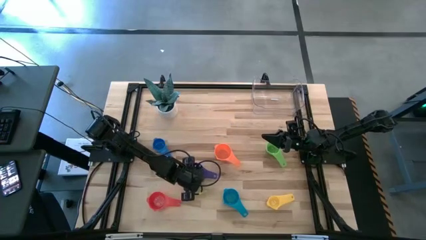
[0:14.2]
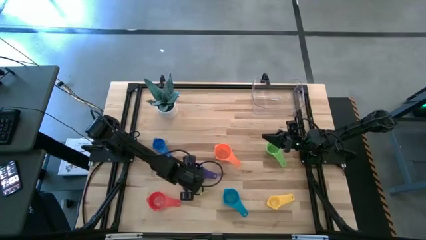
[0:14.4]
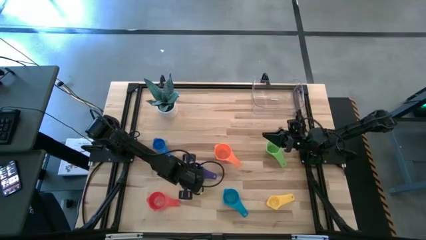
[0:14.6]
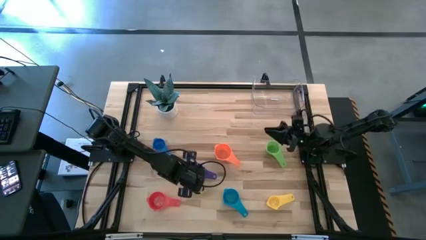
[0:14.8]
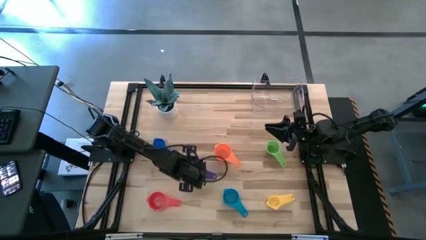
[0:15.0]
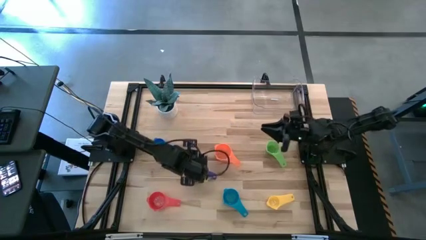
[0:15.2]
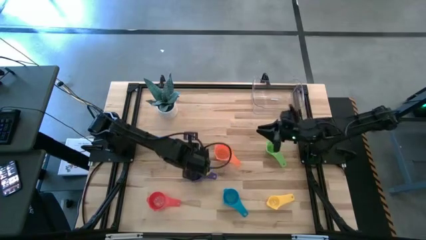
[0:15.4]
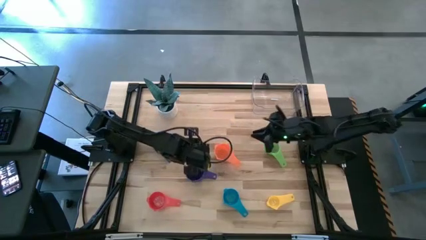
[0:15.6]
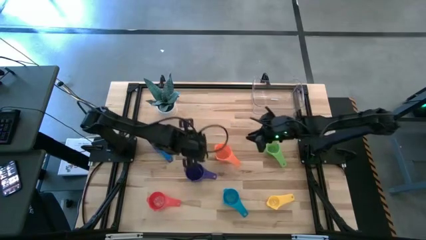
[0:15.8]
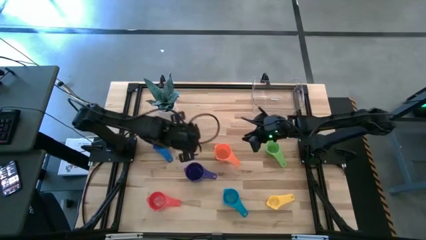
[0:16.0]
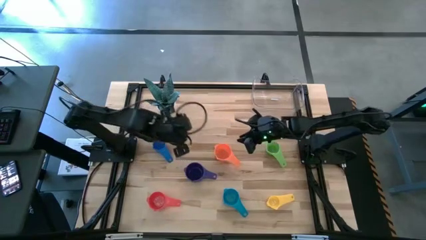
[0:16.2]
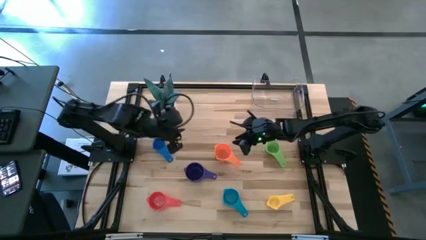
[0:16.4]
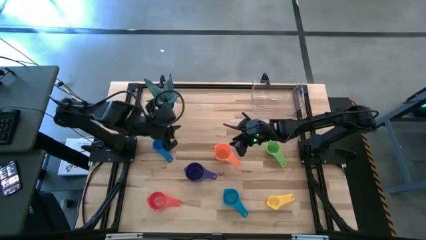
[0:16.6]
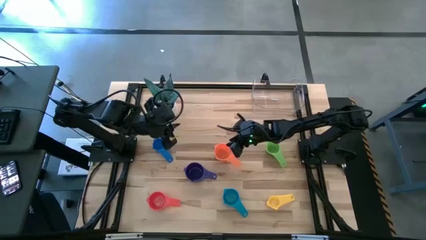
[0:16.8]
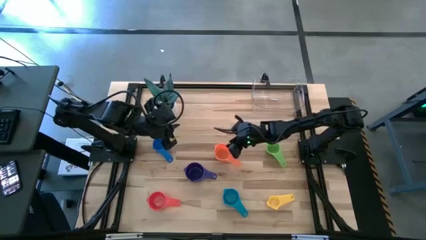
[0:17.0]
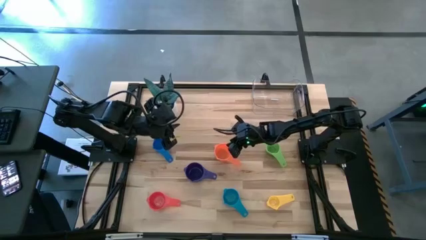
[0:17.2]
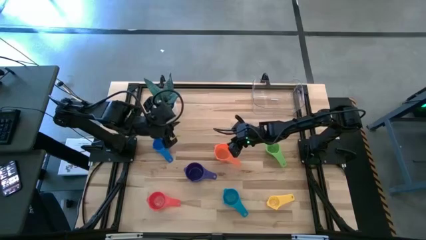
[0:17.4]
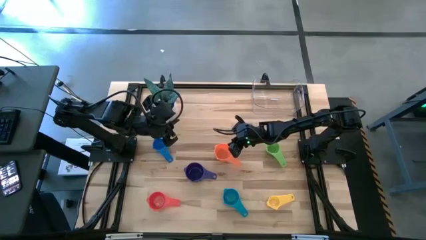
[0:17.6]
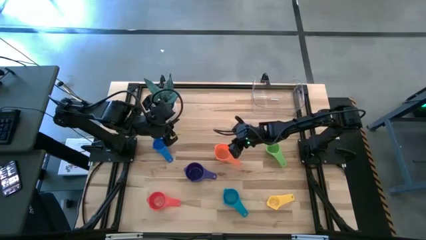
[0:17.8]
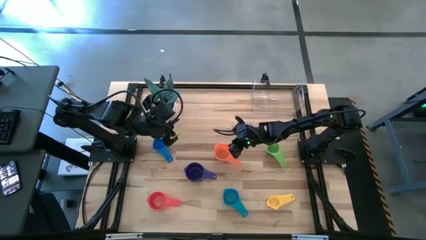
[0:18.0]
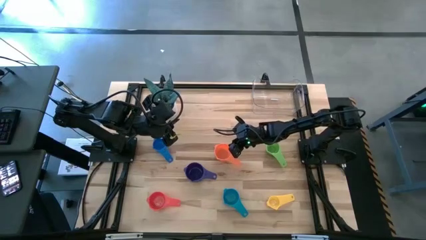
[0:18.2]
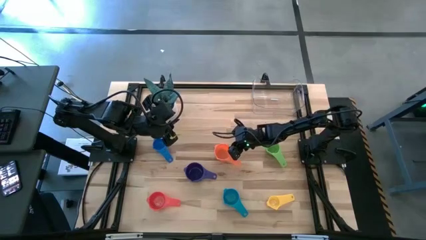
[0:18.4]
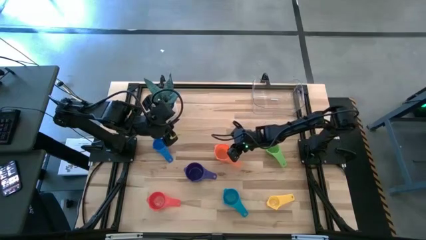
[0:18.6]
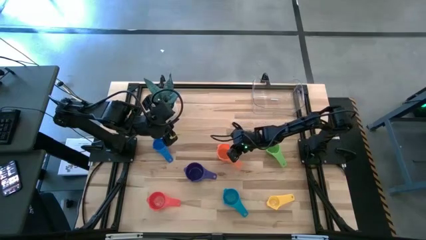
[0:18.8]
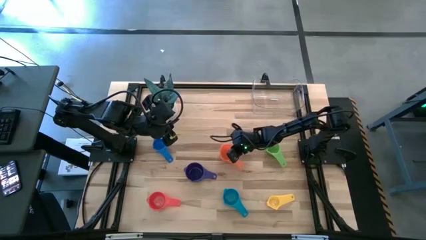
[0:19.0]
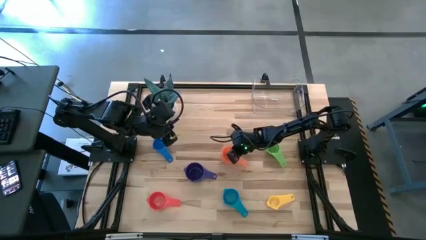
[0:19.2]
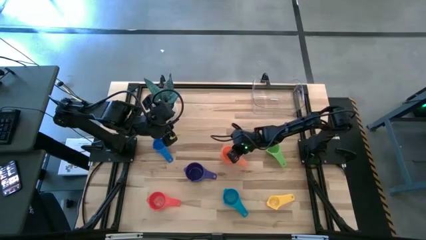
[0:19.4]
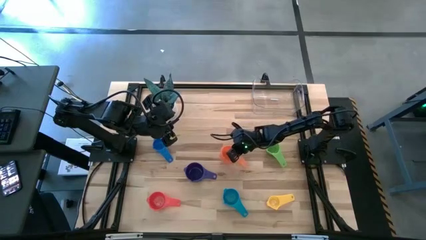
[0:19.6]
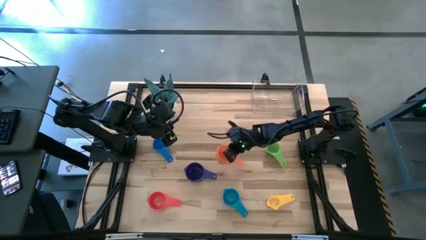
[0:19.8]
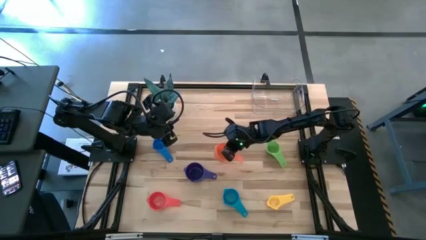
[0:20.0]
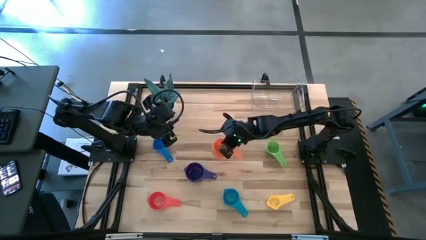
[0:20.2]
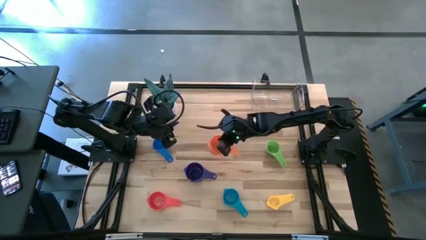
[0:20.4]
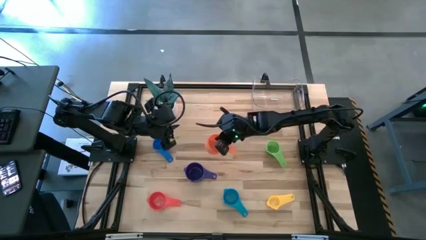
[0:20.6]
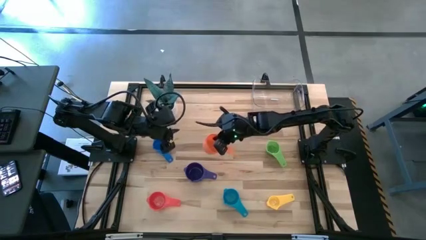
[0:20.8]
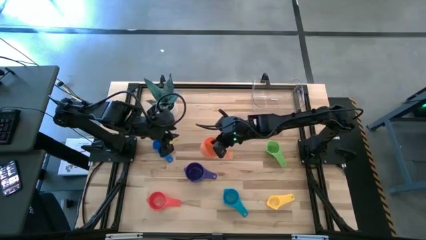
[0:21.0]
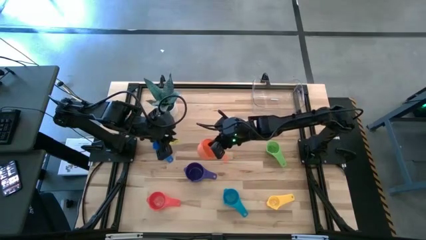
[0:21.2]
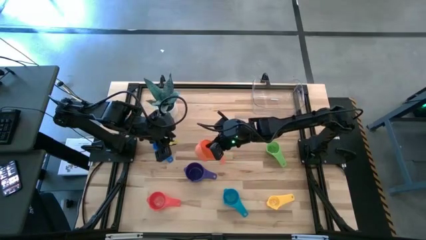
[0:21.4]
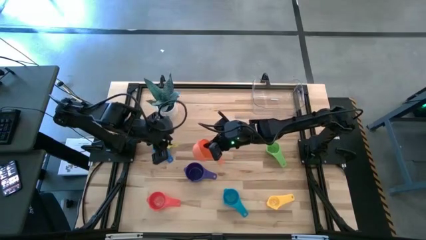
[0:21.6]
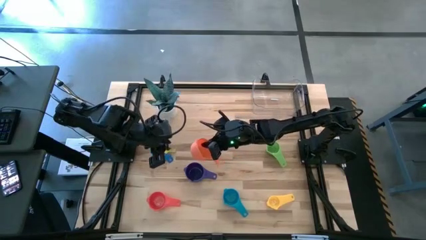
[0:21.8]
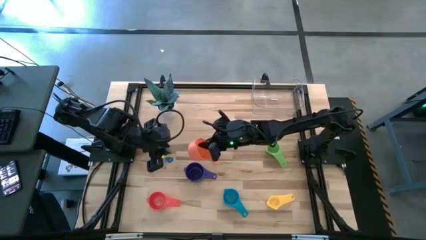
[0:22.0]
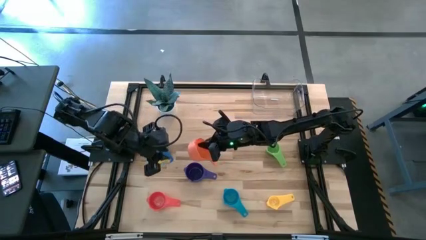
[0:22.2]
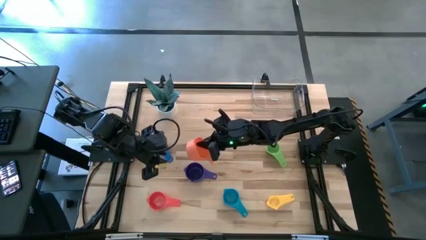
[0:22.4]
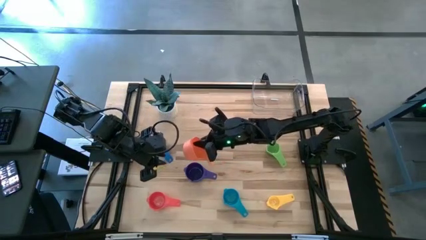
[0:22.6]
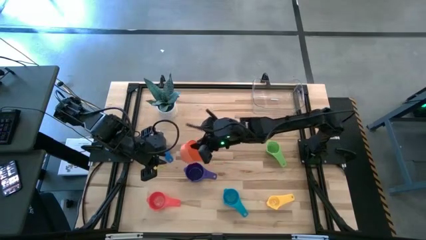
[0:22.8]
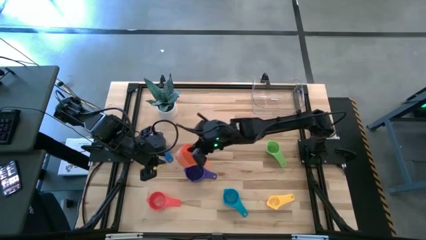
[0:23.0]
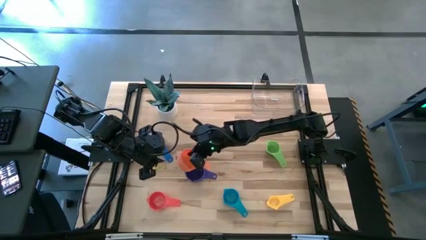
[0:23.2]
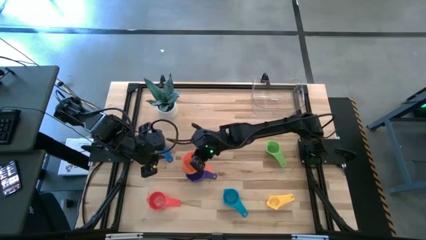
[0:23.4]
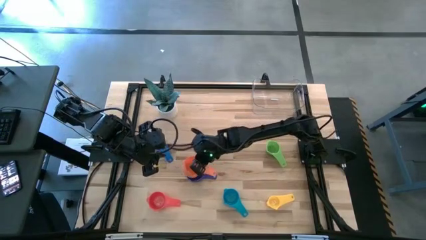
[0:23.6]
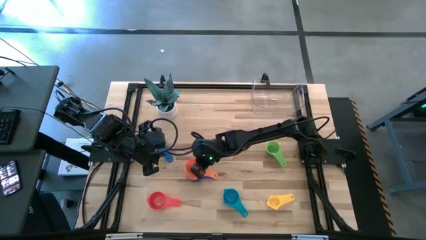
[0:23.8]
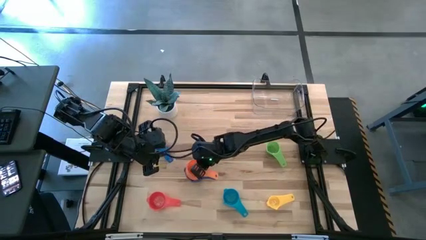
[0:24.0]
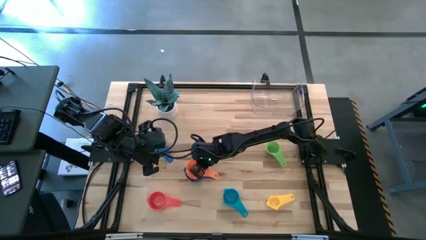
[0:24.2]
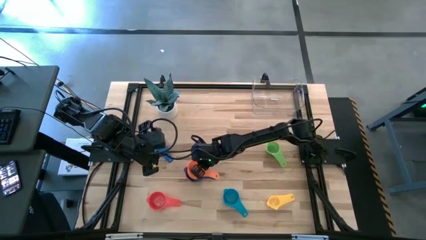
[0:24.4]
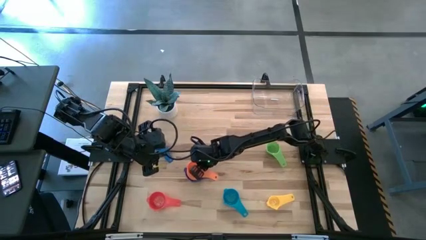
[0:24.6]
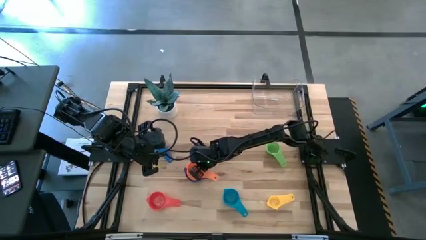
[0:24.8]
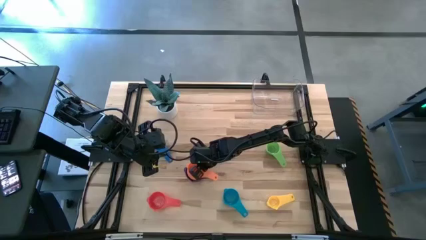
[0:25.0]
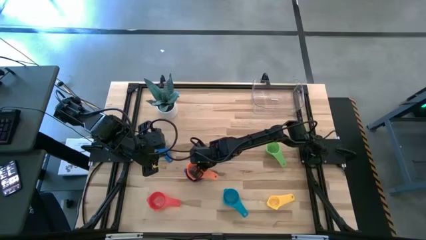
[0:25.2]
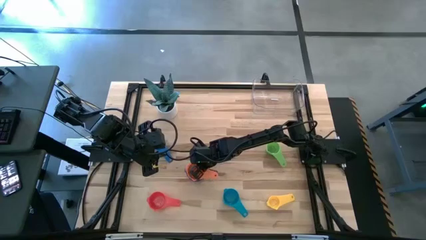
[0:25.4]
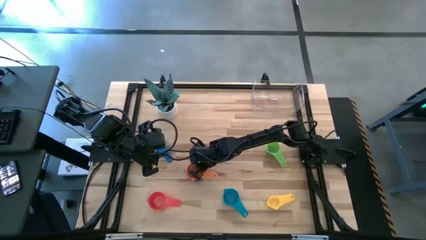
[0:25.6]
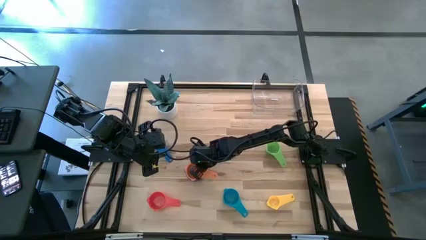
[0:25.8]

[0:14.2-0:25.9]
Task: Nest measuring cups in basket
Stack the orange measuring cup on top of the violet measuring cup

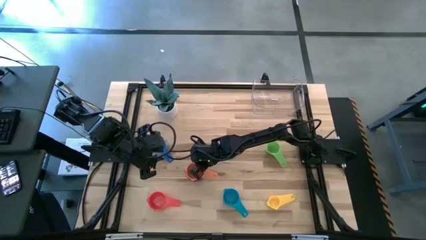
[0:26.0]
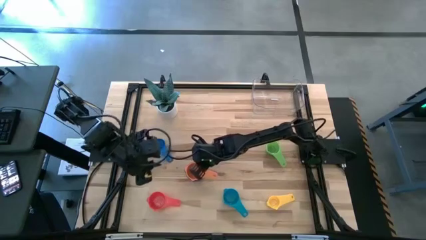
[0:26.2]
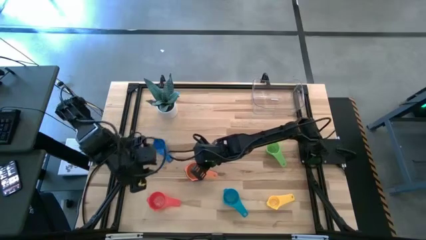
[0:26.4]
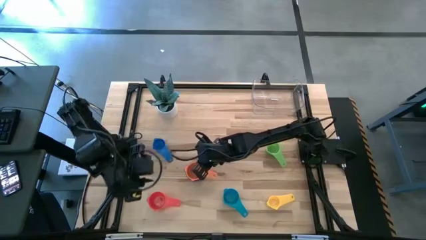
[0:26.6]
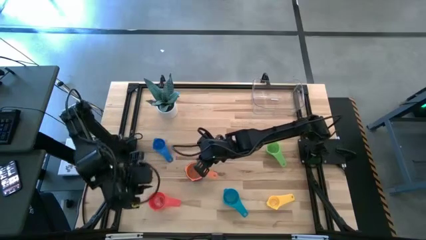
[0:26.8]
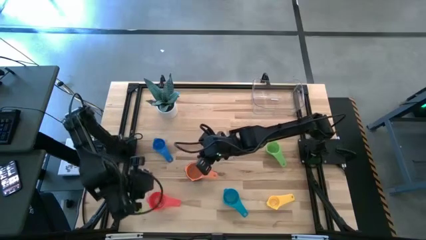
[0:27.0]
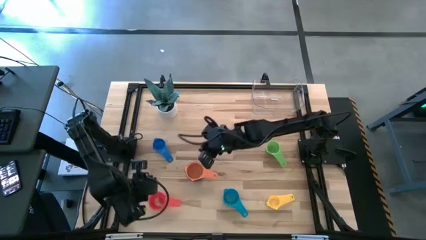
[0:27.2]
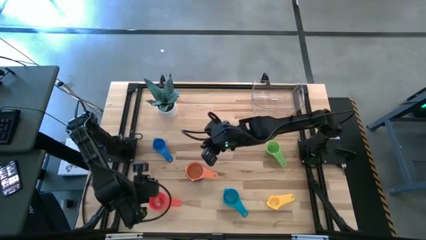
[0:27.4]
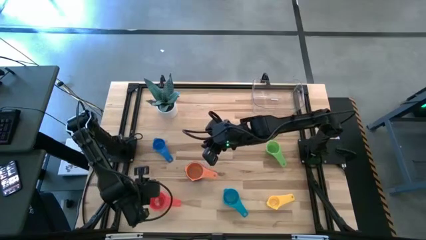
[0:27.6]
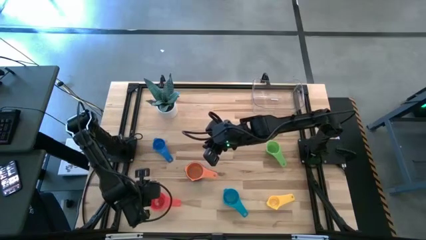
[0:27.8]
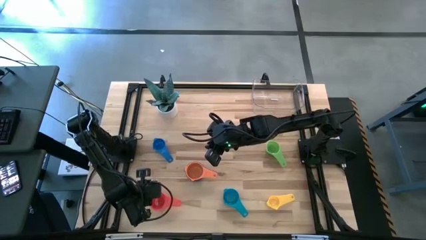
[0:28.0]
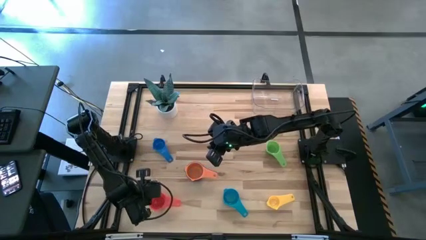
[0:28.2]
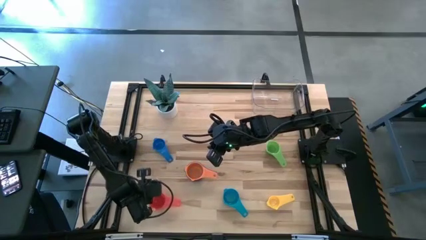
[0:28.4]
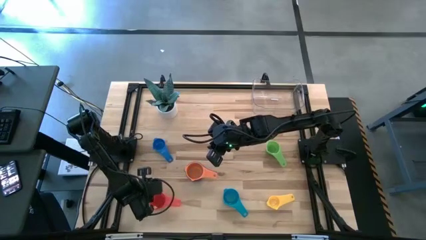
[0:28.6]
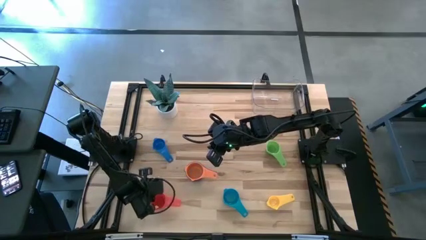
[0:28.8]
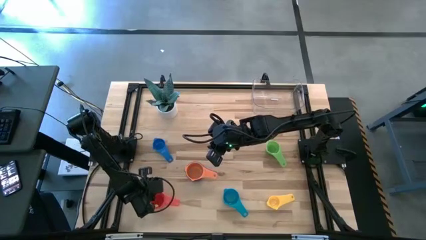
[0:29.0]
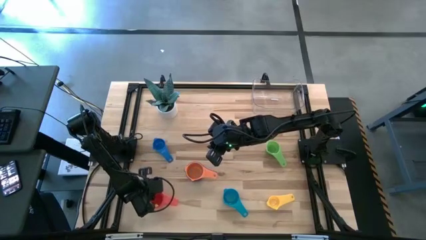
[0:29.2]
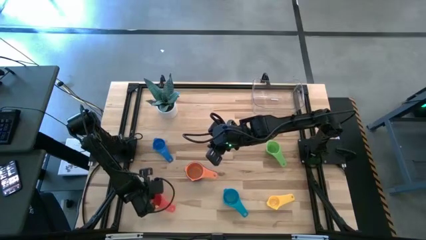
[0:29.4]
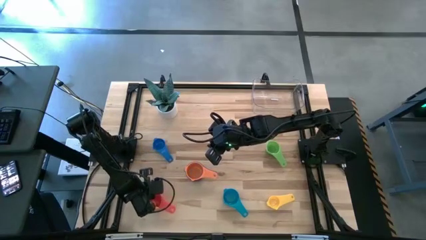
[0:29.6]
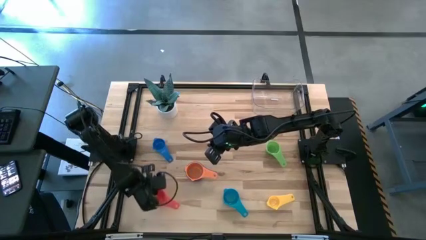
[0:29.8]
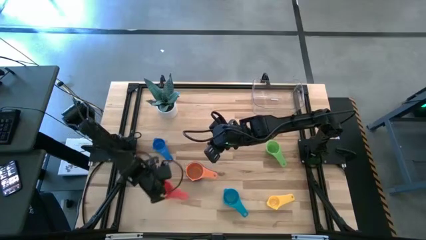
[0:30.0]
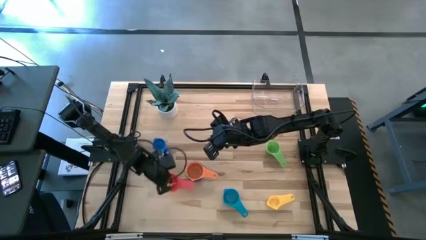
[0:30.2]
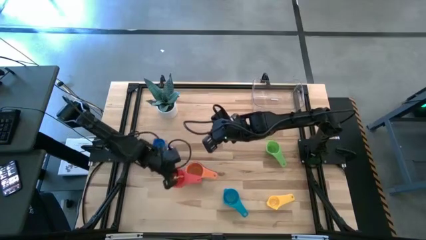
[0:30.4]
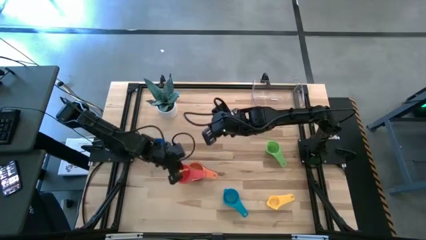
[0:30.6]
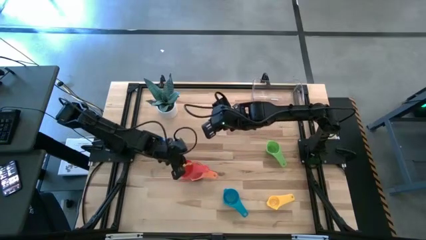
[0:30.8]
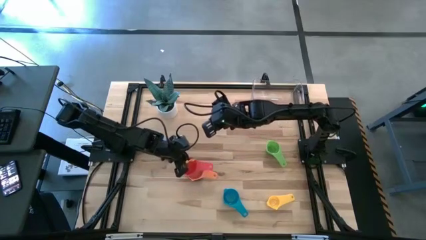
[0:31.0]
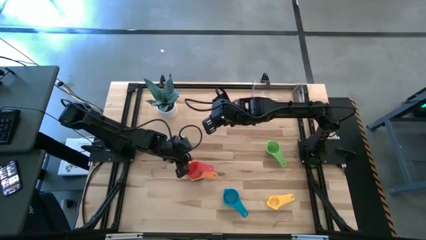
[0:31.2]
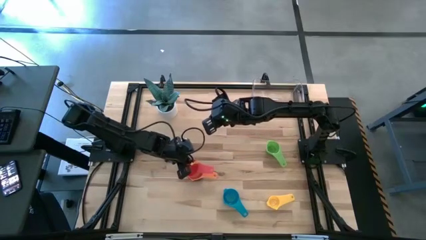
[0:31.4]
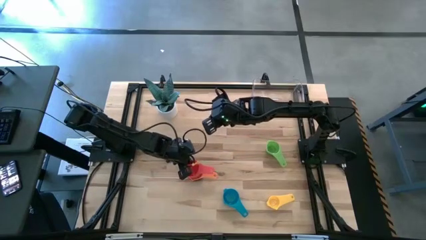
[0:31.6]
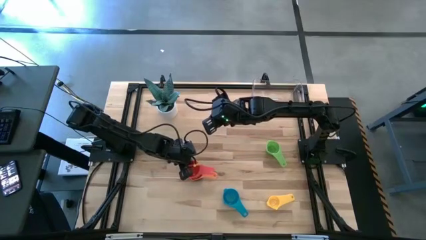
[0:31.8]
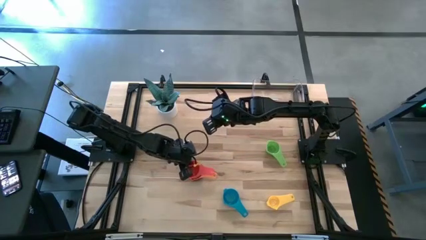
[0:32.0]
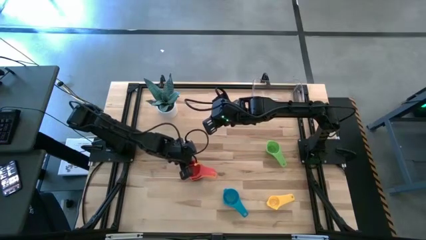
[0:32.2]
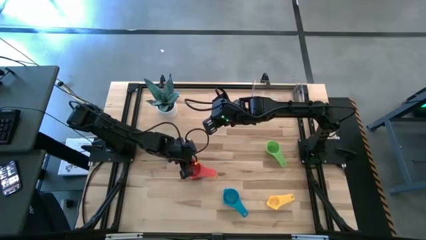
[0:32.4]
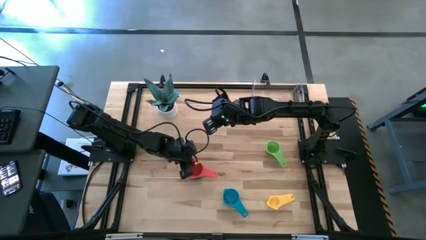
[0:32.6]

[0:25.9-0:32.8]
Stack the red measuring cup on top of the orange measuring cup
